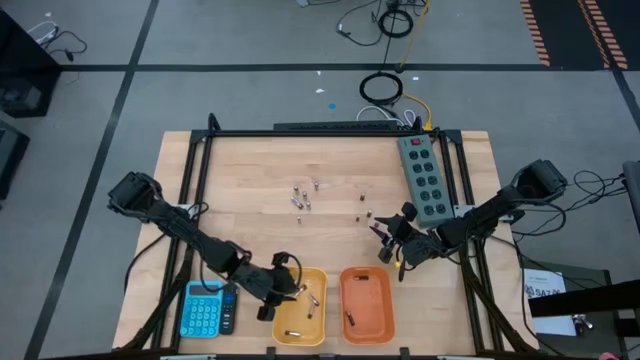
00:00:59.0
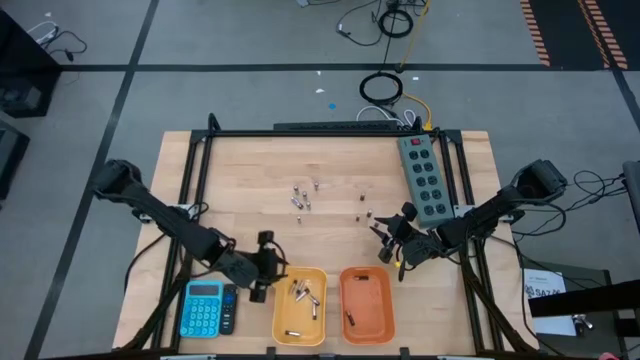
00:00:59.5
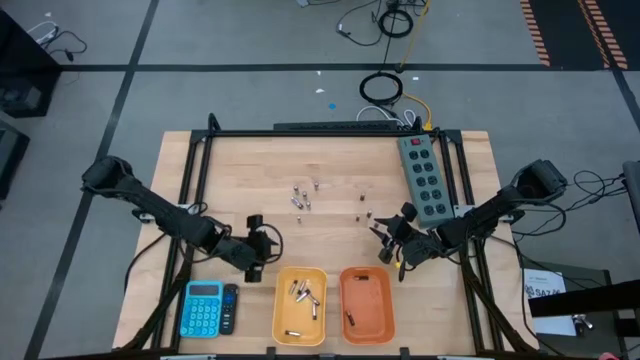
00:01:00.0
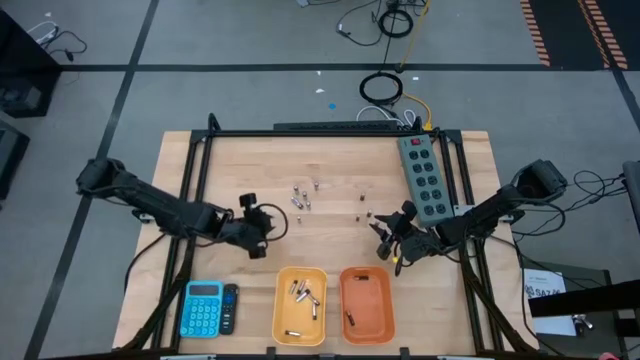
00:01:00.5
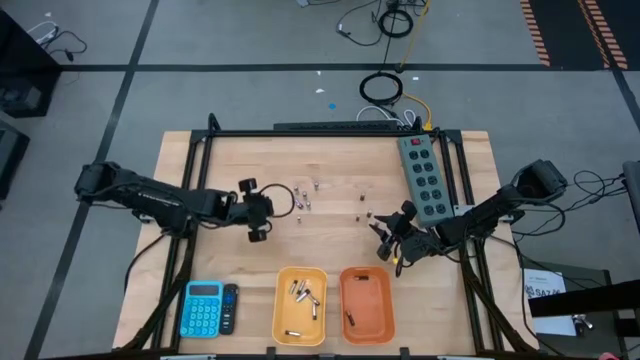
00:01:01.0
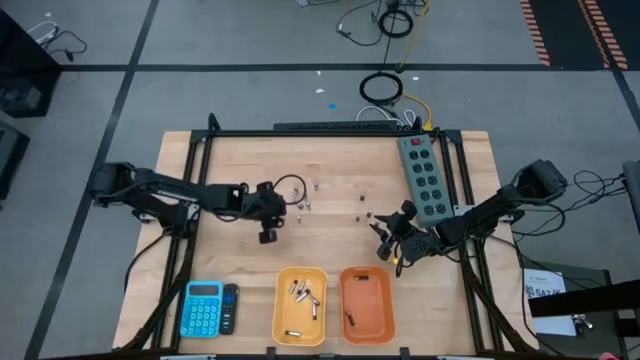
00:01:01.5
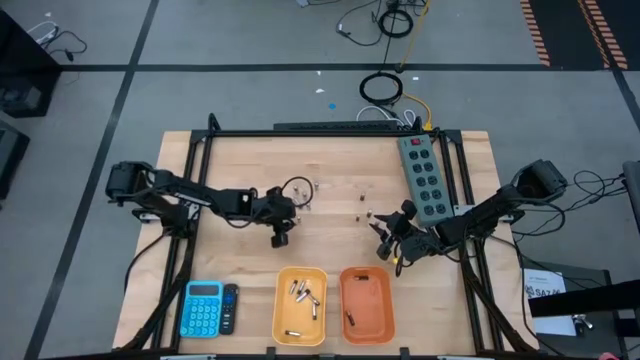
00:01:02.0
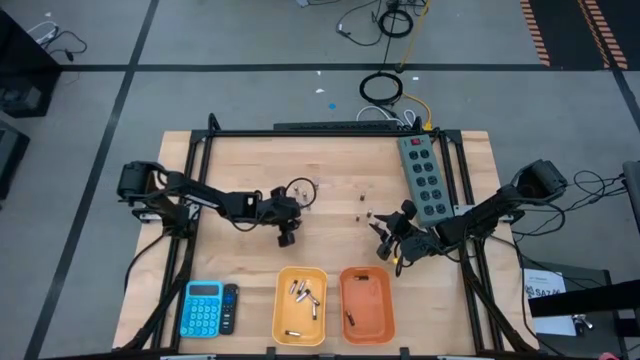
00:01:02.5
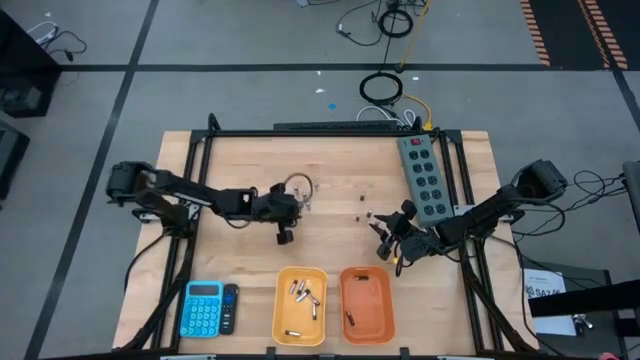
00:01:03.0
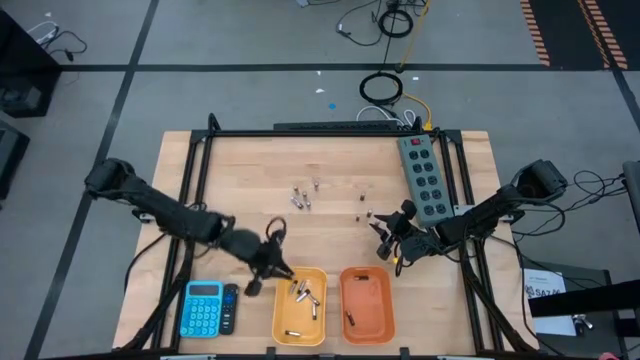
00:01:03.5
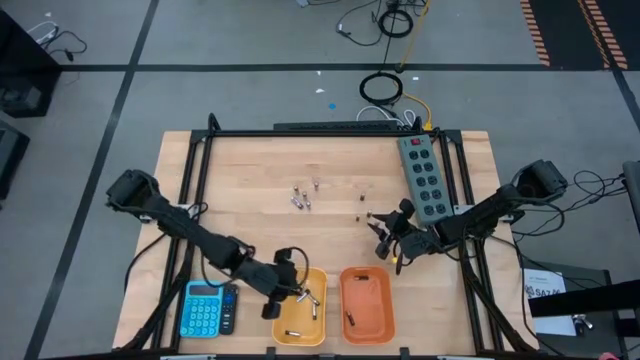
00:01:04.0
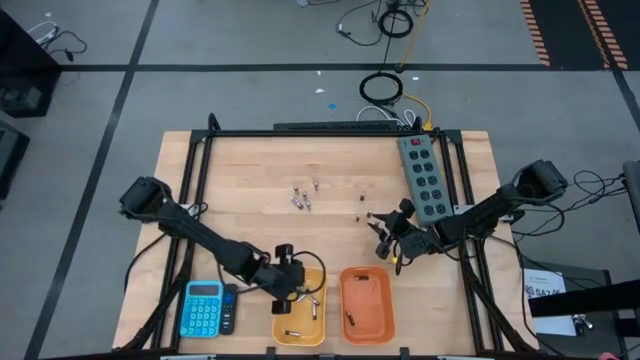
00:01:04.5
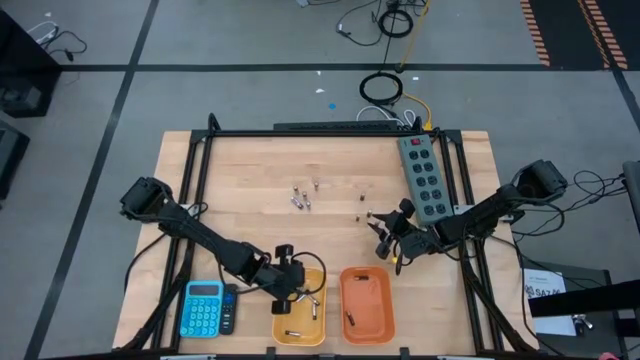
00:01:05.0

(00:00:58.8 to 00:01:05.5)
Task: Sort batteries
Put the silver battery into the yellow bin

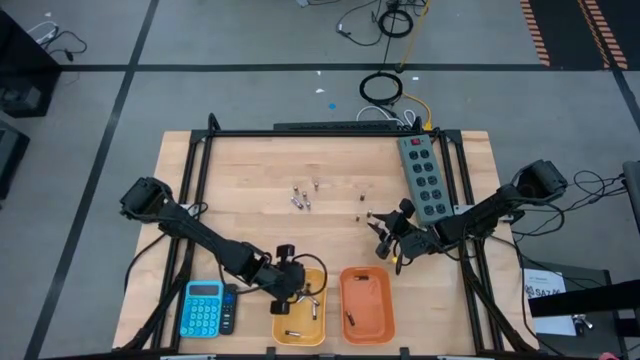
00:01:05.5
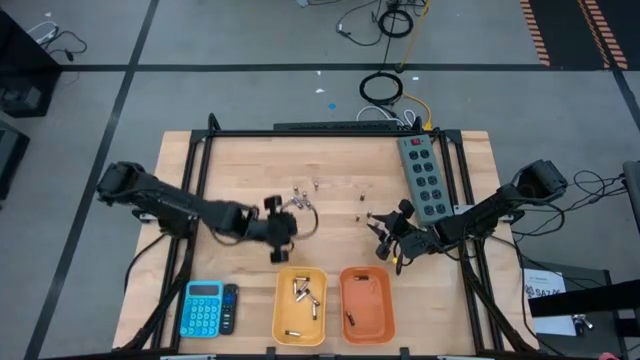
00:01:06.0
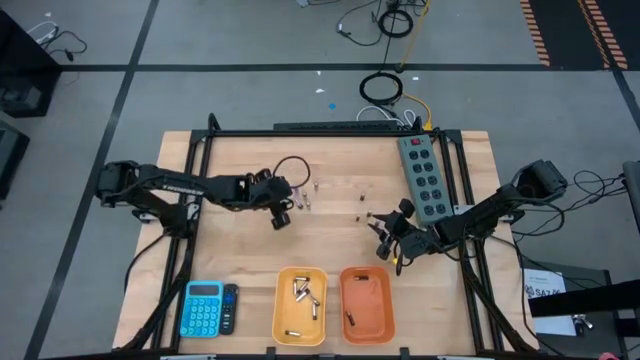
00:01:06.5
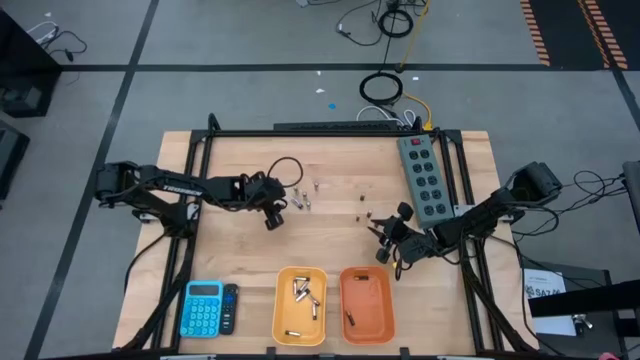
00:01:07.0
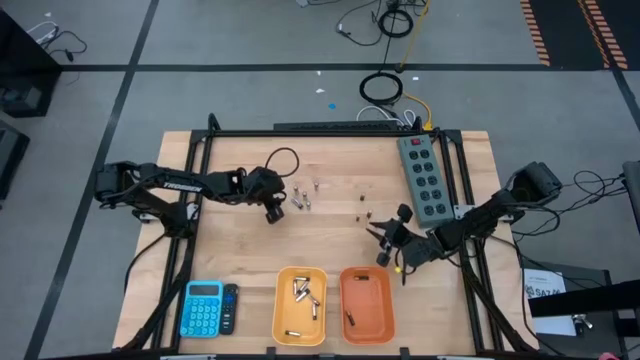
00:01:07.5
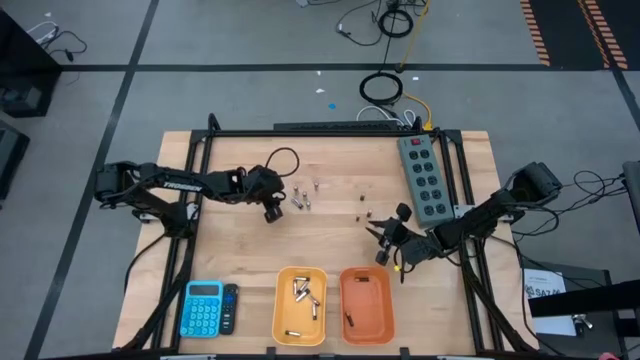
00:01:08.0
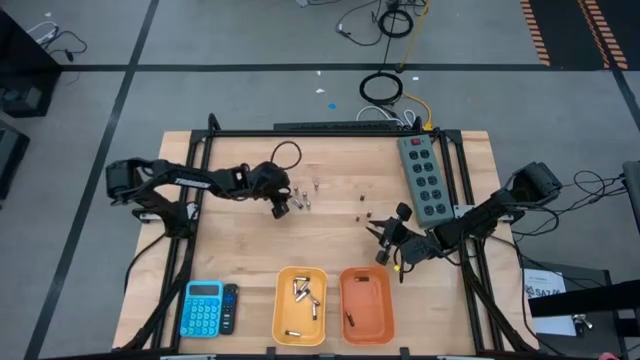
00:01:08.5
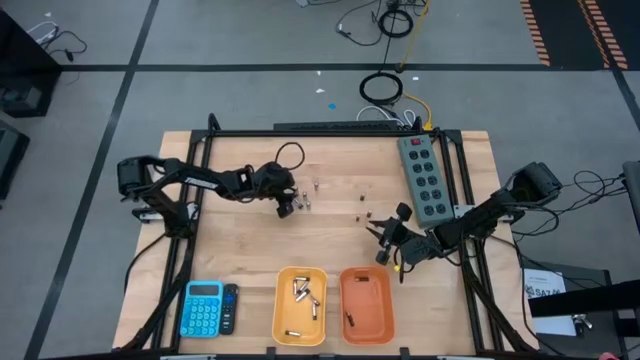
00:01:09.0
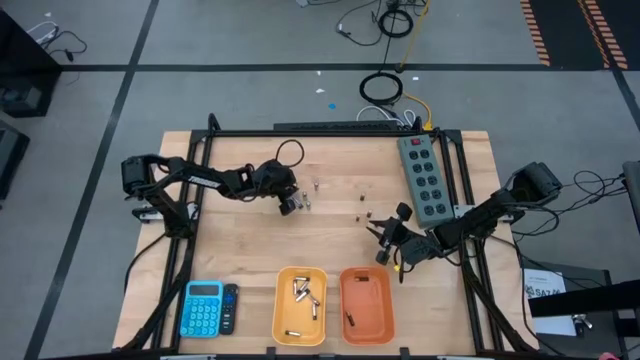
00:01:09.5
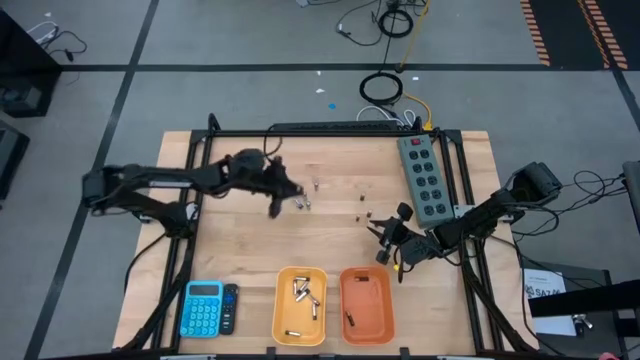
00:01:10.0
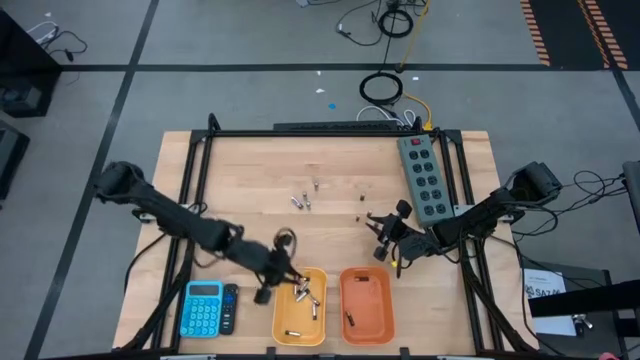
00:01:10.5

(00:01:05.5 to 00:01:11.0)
Put the silver battery into the yellow bin

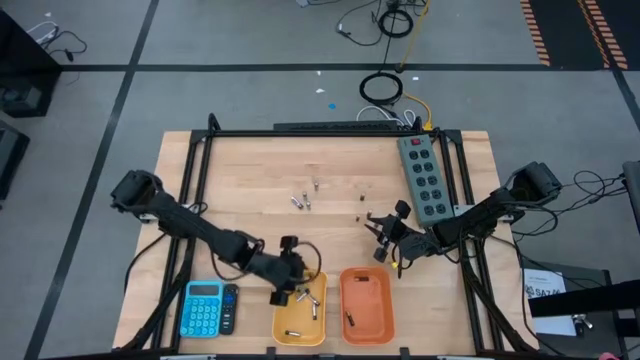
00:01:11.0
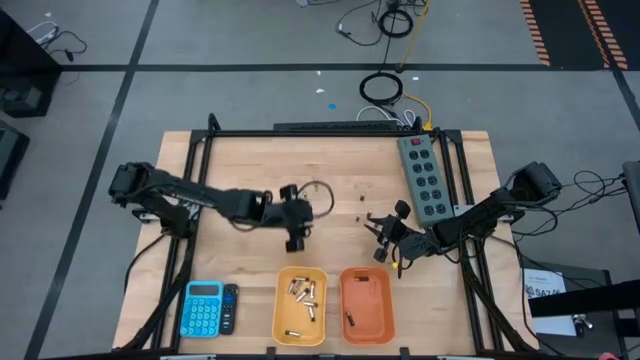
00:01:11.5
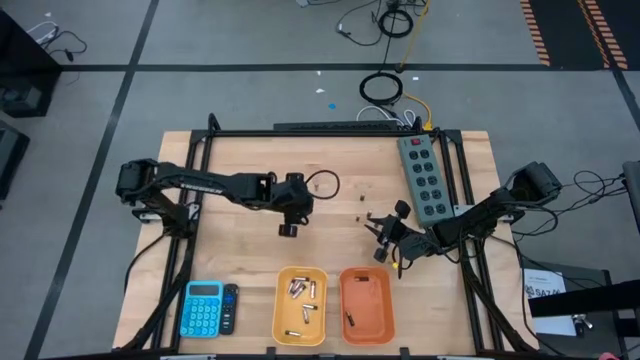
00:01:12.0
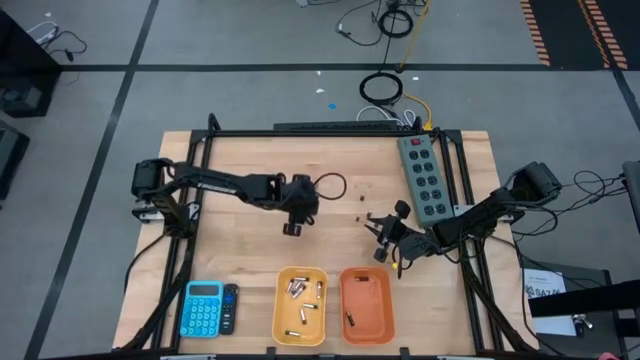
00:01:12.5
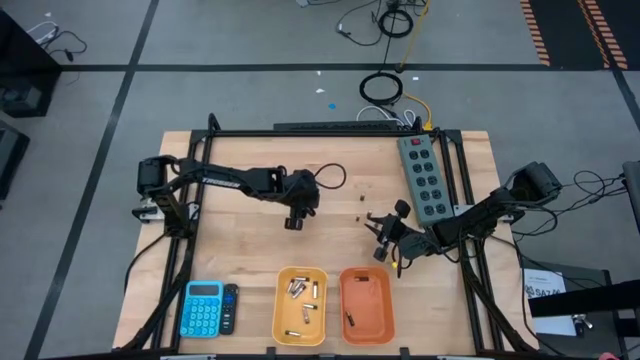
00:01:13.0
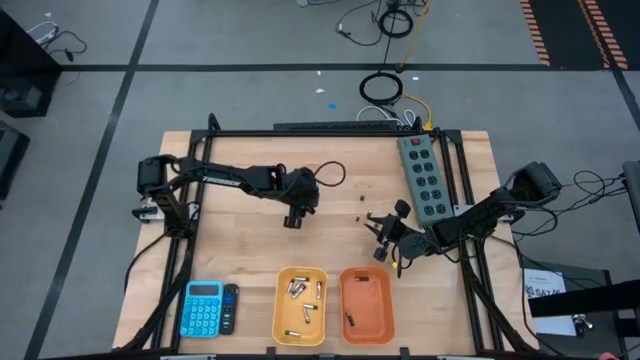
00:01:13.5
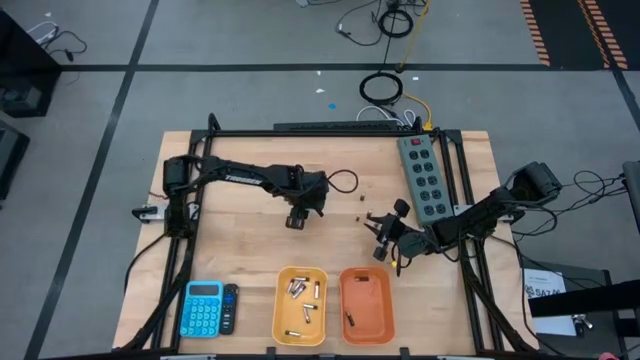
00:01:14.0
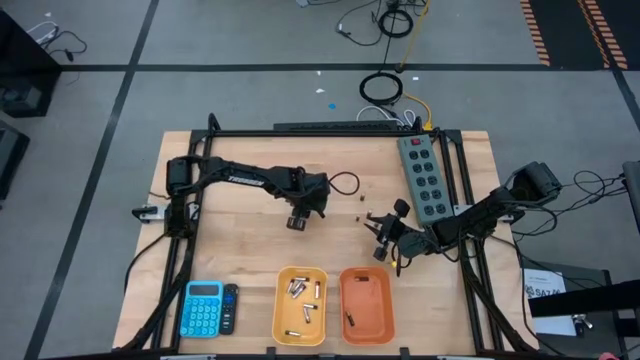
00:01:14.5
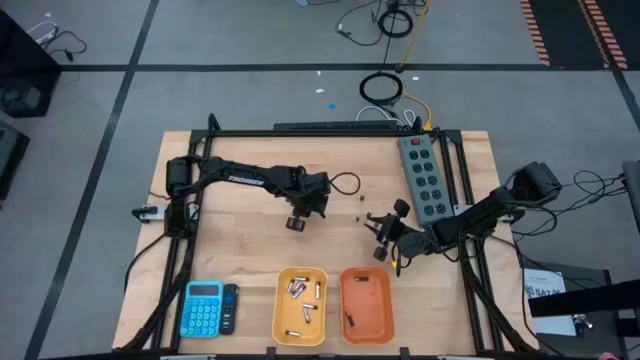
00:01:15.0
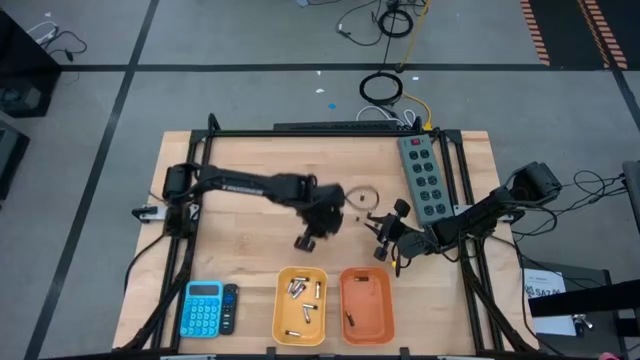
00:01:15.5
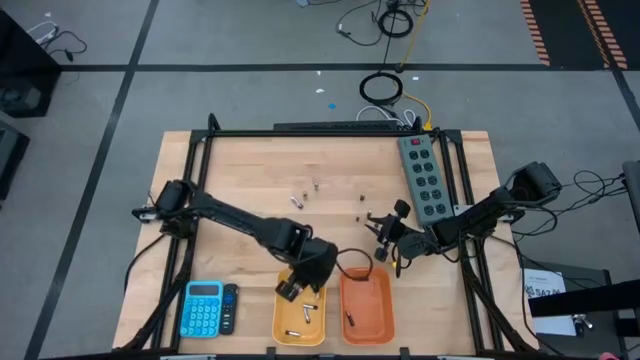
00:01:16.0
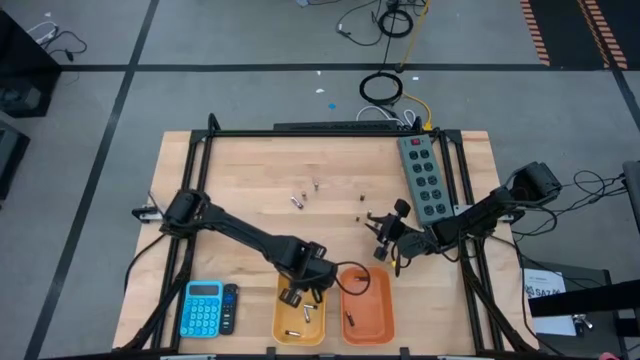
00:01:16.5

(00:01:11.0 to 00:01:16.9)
Put the silver battery into the yellow bin

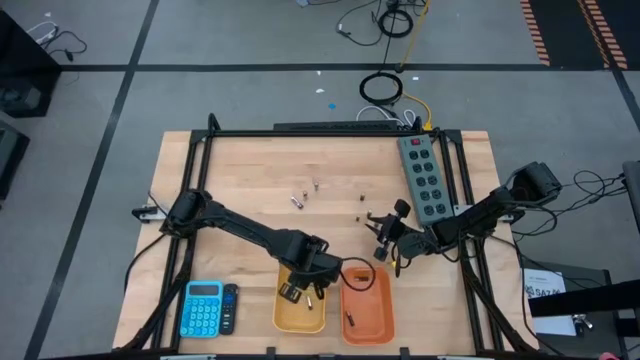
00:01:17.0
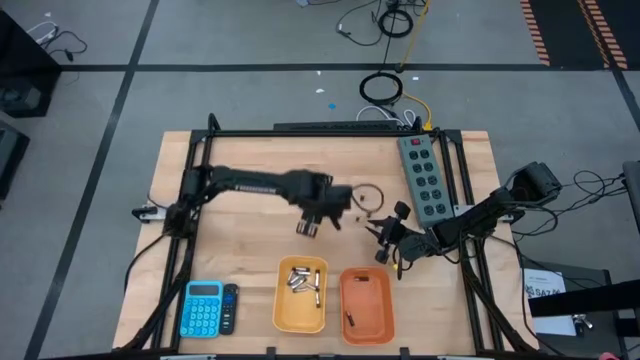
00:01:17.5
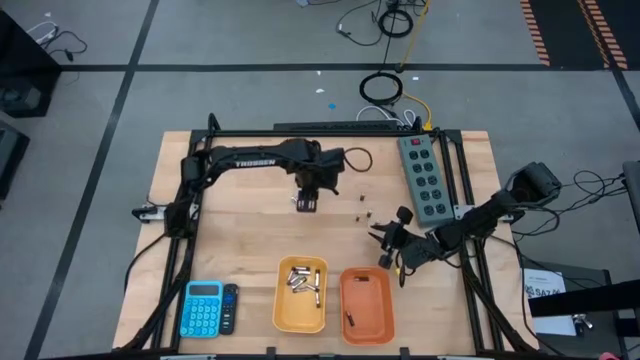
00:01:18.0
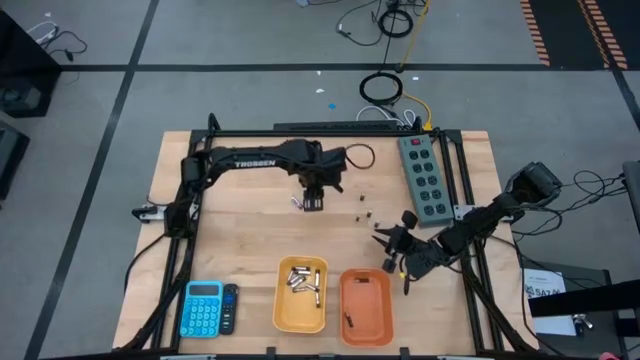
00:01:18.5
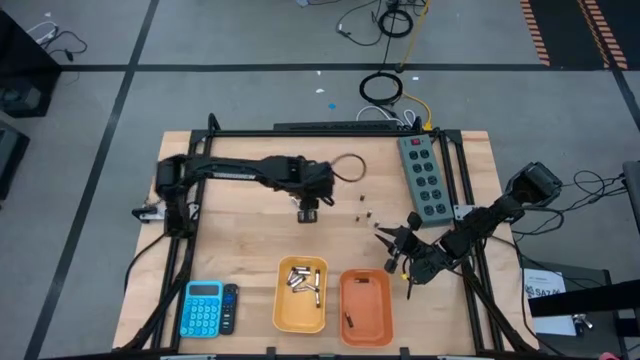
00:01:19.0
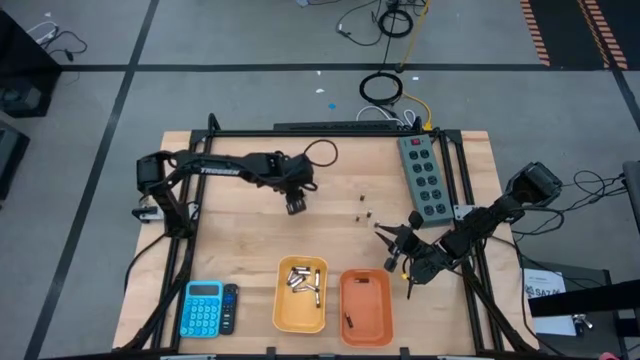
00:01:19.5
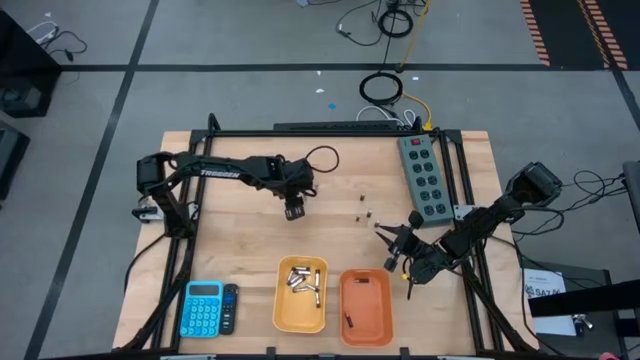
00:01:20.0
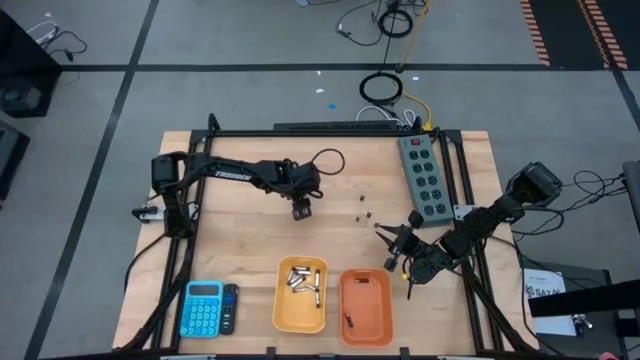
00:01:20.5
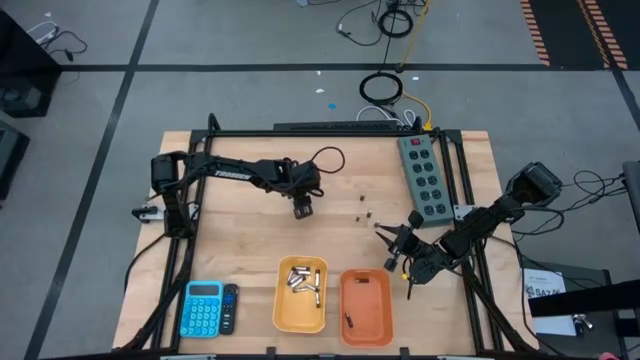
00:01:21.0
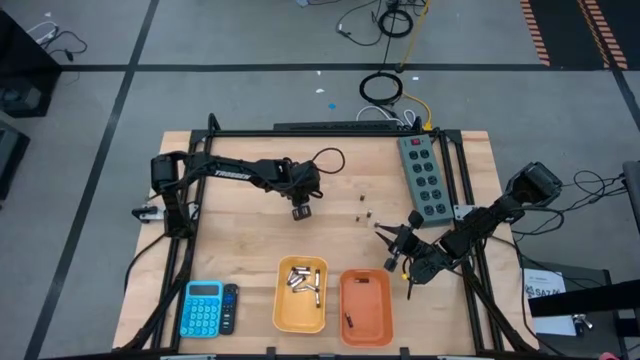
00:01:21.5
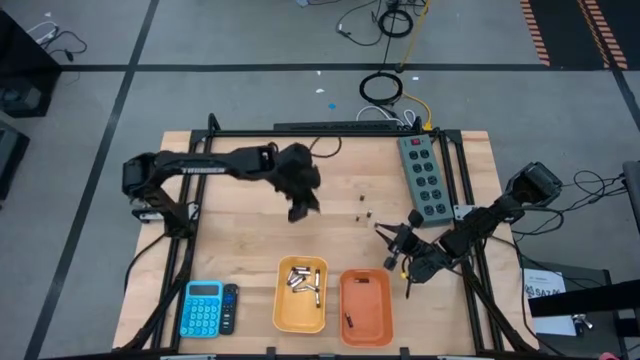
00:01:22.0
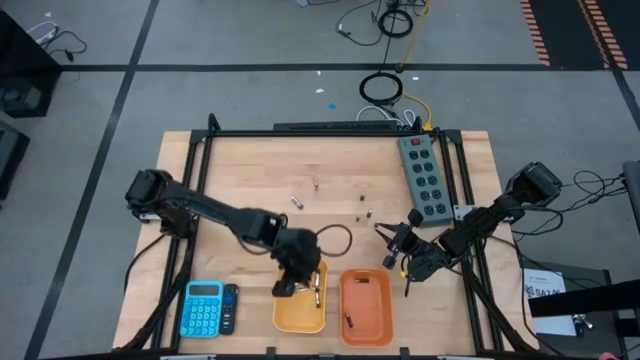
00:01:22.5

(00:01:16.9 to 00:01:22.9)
Put the silver battery into the yellow bin
